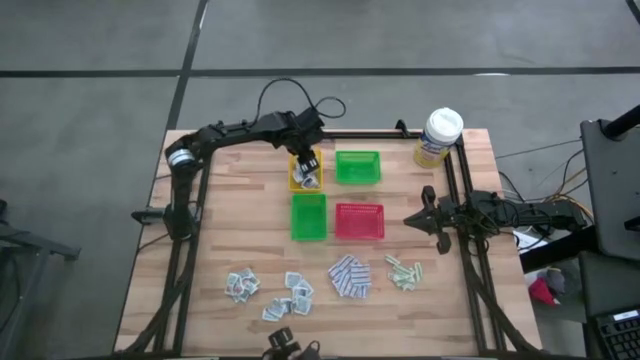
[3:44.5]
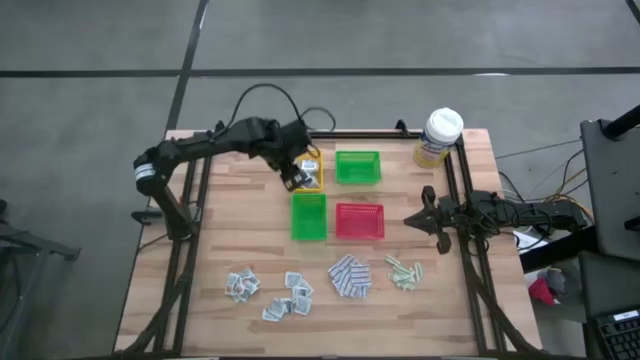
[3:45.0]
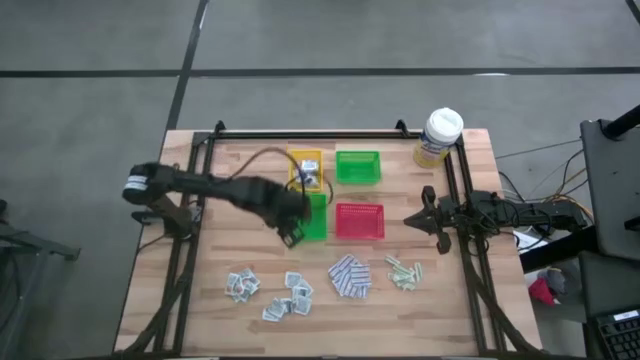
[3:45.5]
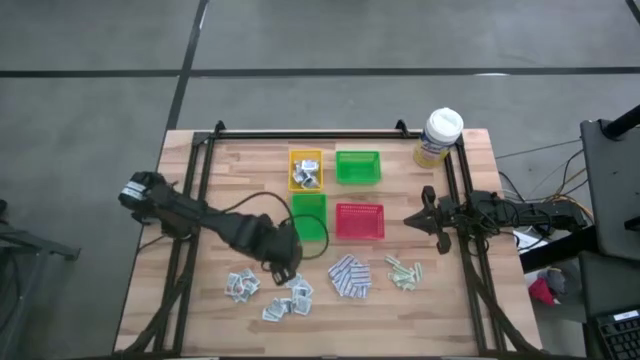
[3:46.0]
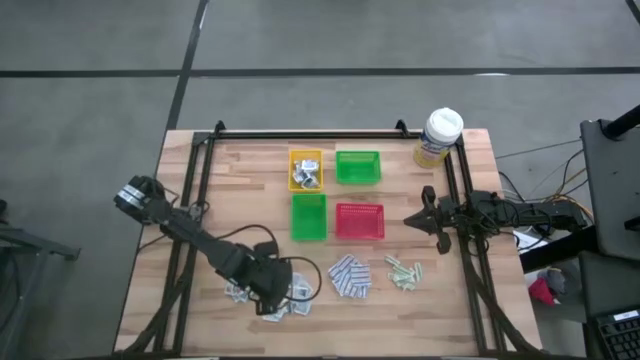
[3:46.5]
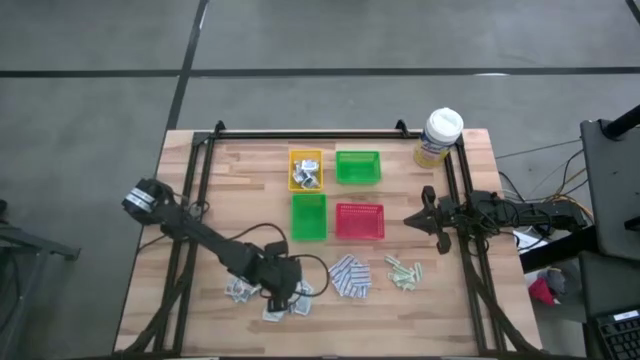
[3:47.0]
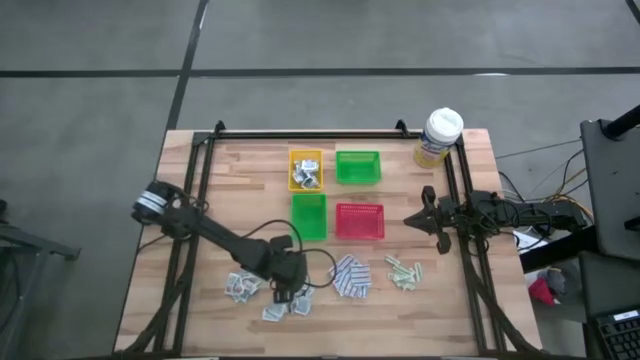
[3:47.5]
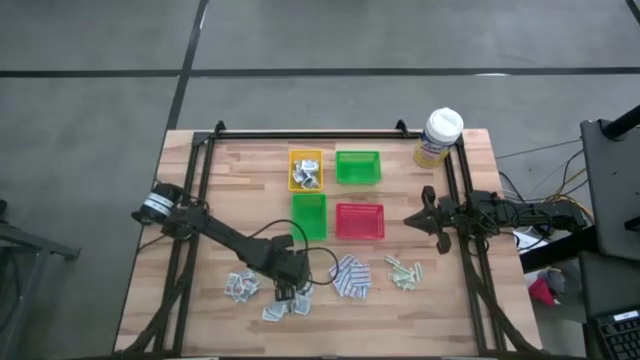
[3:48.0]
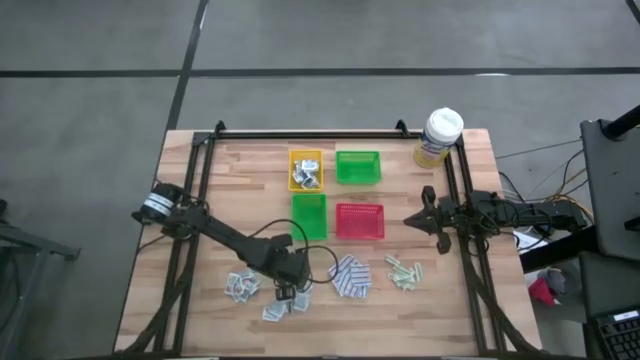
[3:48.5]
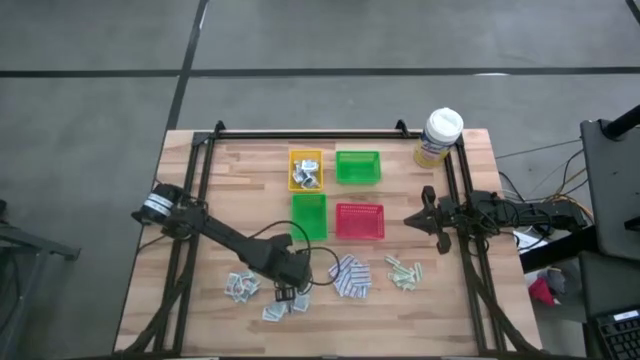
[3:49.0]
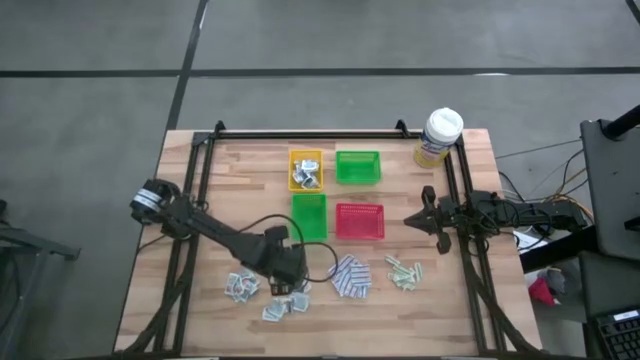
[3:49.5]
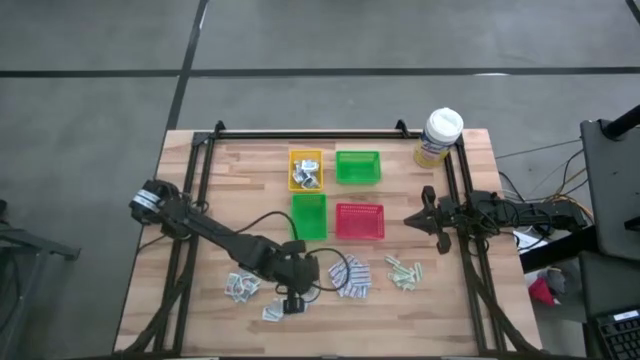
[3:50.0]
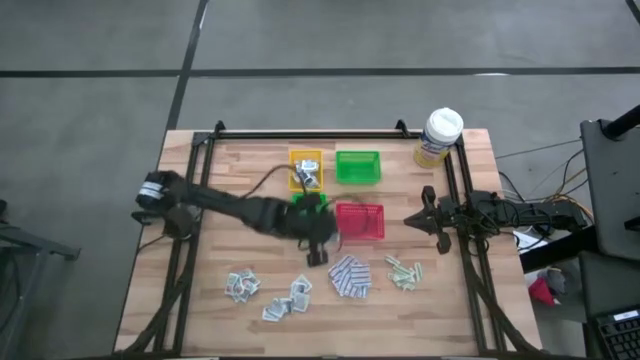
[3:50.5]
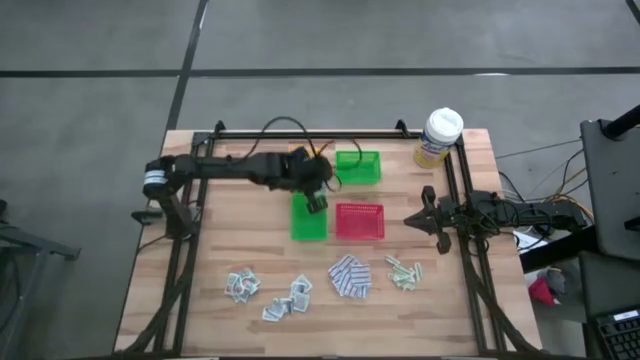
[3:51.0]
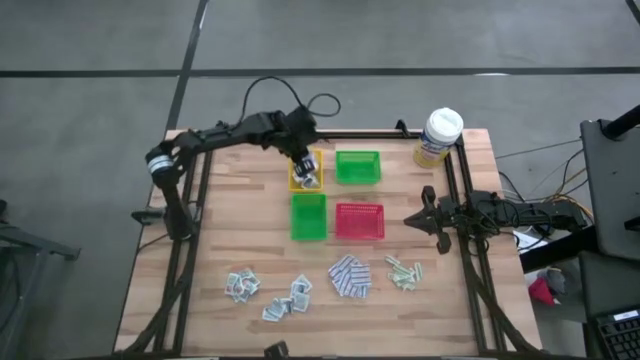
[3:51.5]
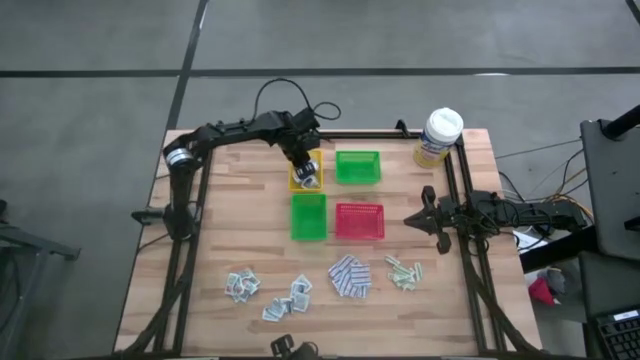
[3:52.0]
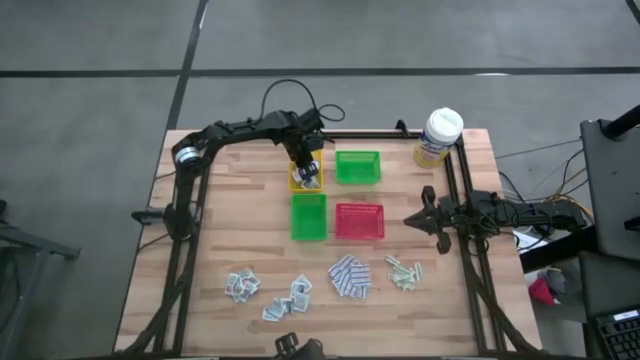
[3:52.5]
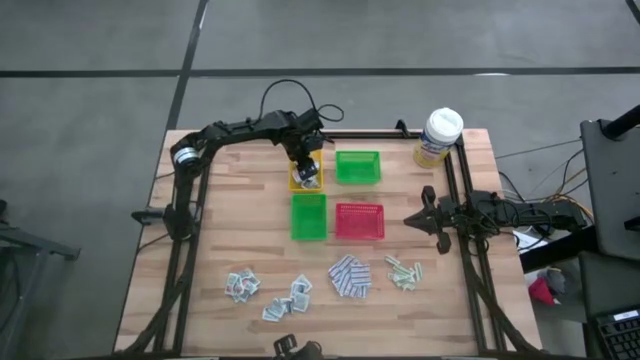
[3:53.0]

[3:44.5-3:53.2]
Task: Pick & Place First Aid Supplies
Put the blue alcohol pad into the yellow bin

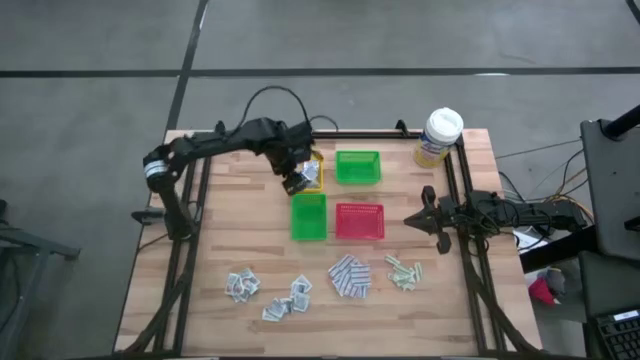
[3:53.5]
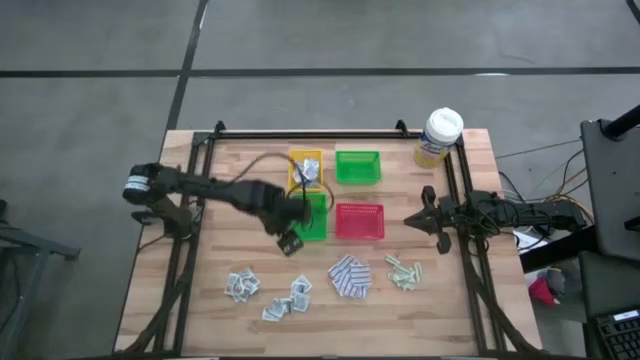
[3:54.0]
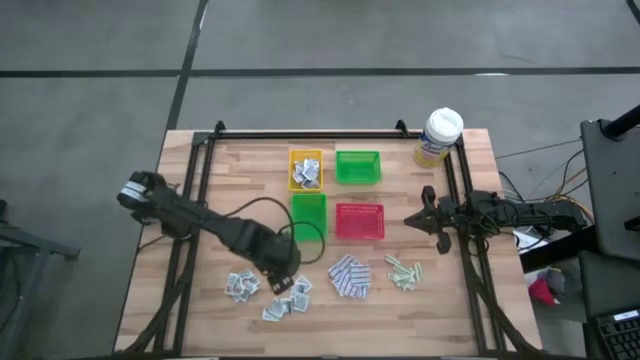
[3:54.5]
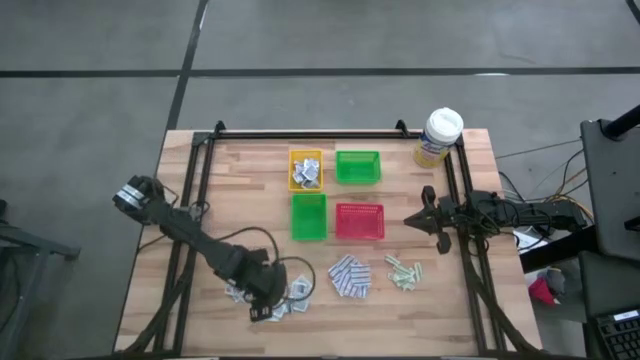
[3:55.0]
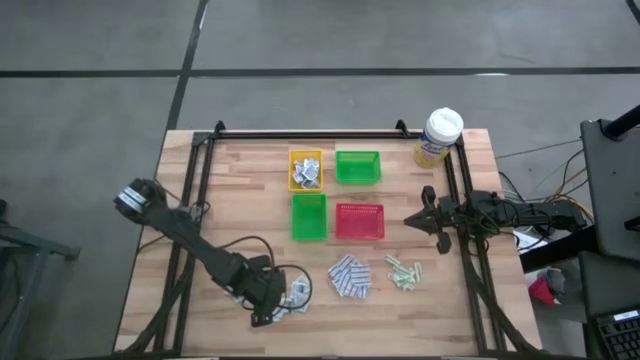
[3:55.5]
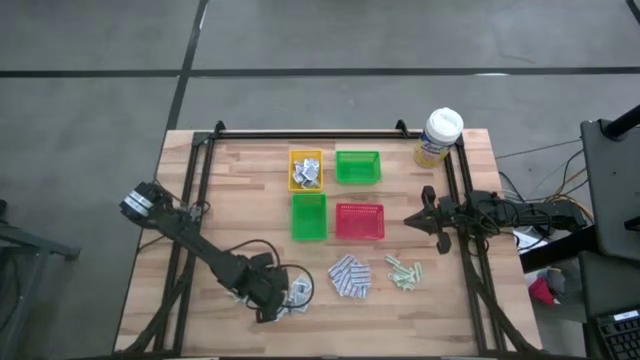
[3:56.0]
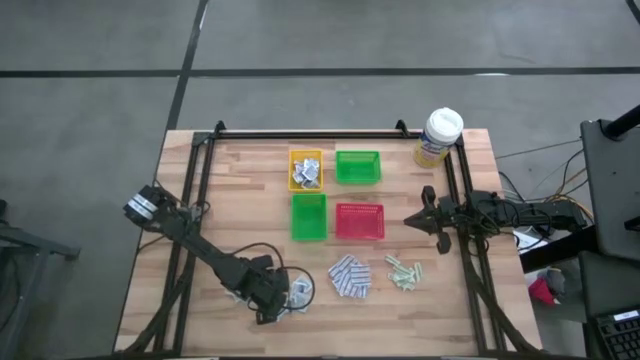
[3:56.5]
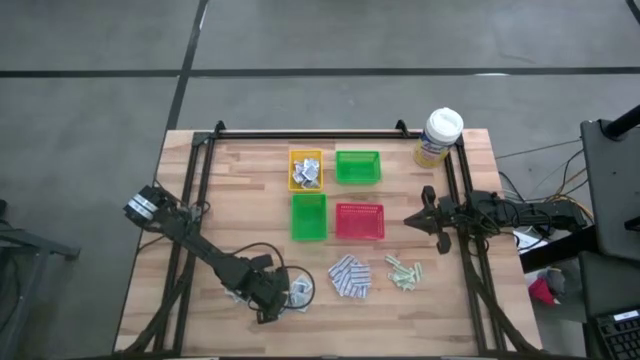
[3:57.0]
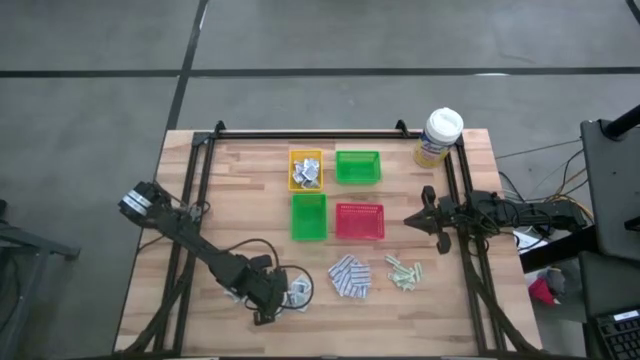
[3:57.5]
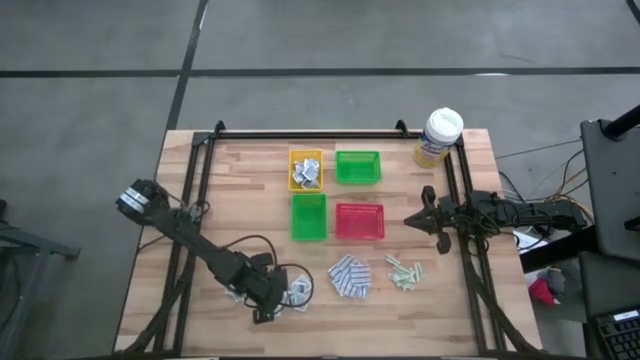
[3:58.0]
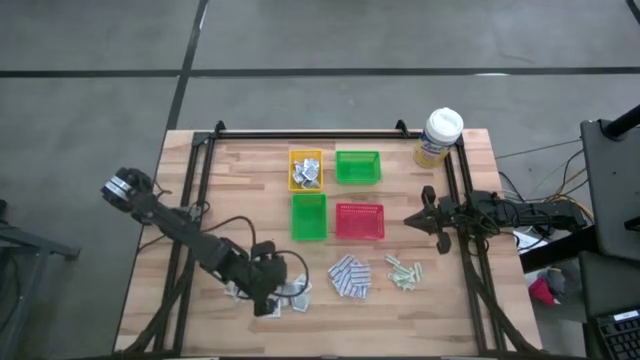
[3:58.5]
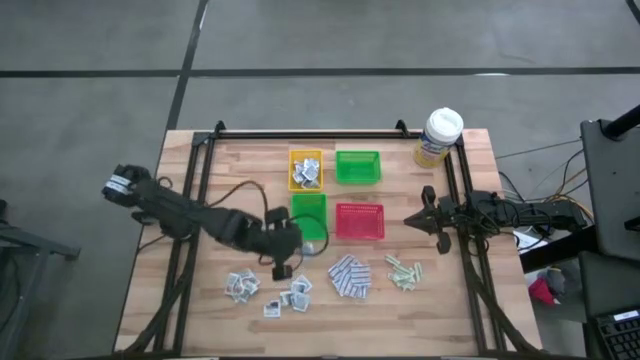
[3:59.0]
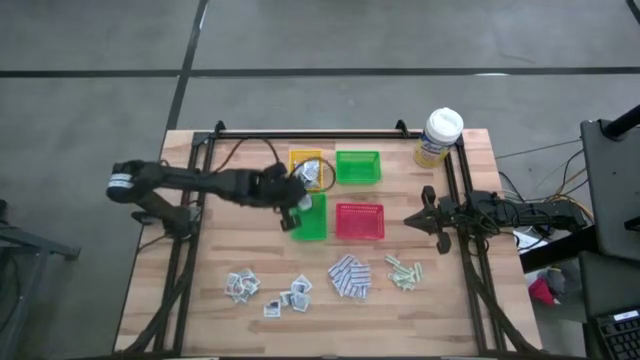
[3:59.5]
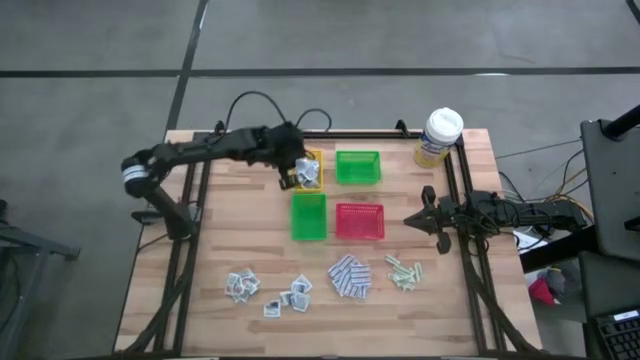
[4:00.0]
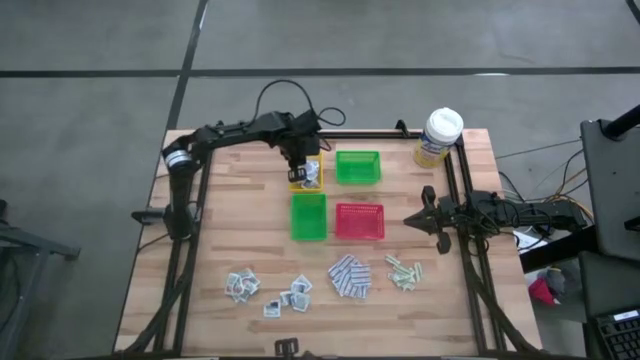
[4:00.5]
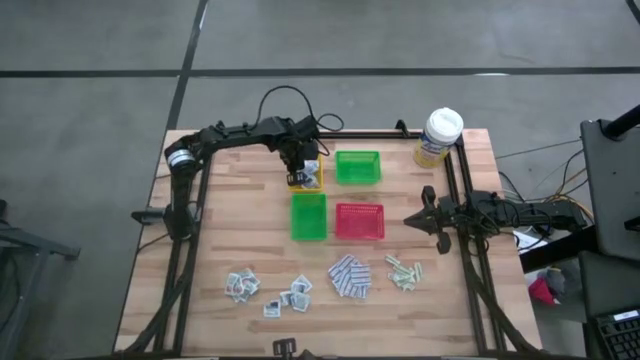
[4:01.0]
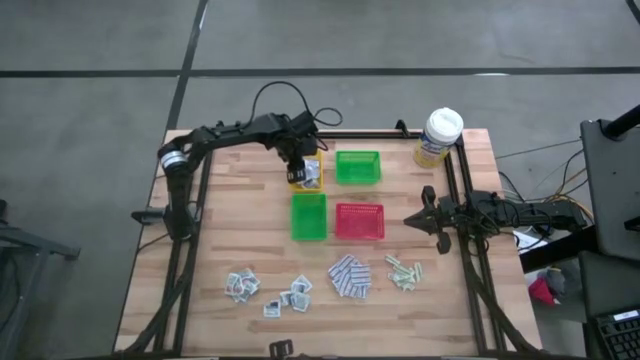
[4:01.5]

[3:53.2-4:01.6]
Put the blue alcohol pad into the yellow bin

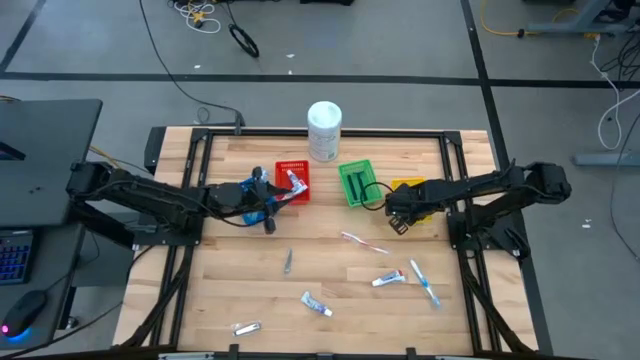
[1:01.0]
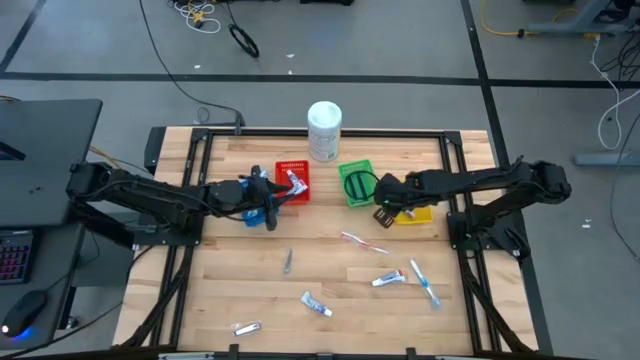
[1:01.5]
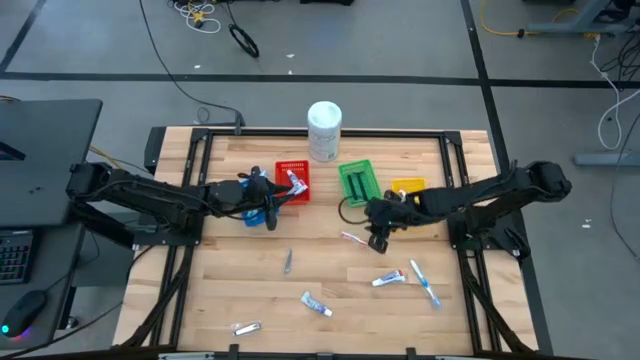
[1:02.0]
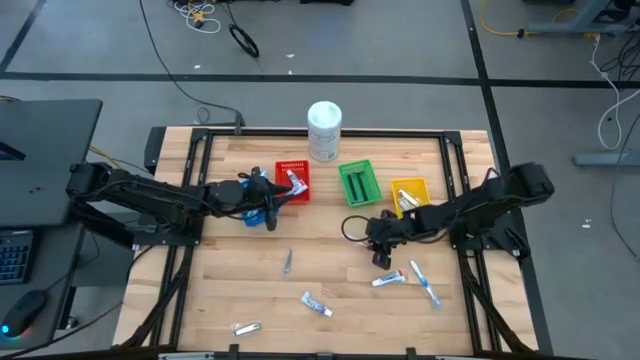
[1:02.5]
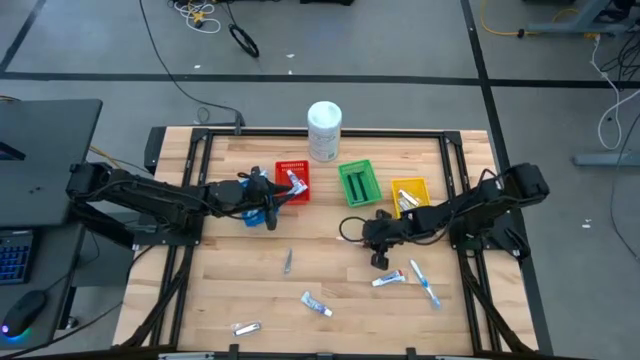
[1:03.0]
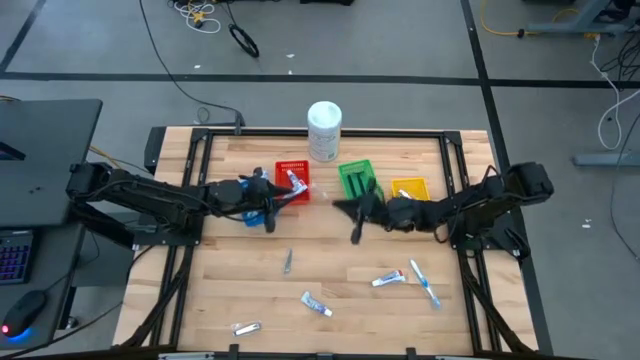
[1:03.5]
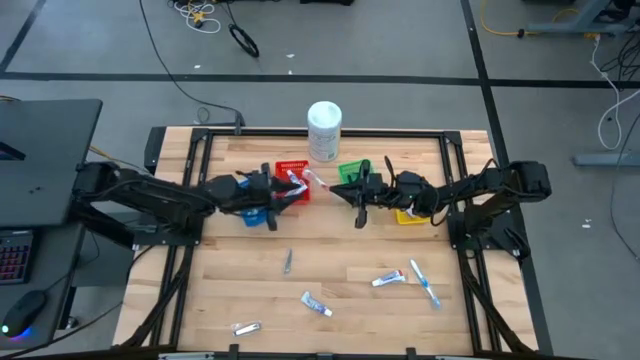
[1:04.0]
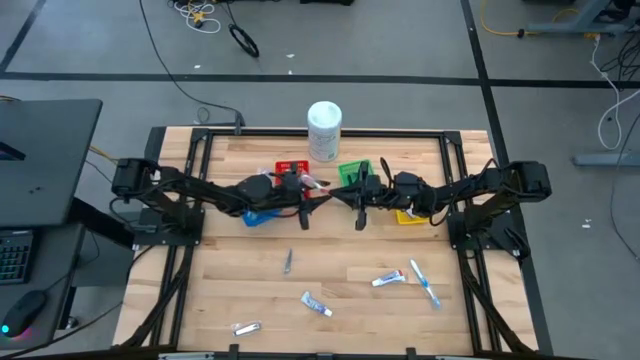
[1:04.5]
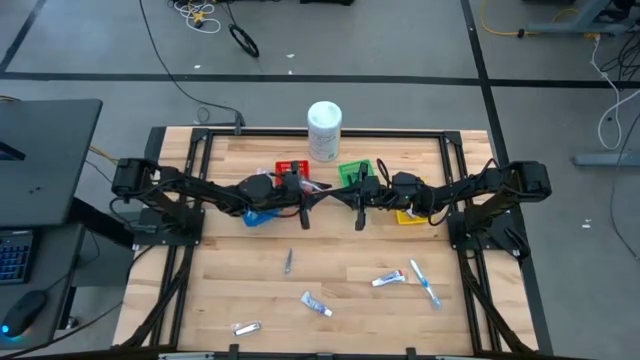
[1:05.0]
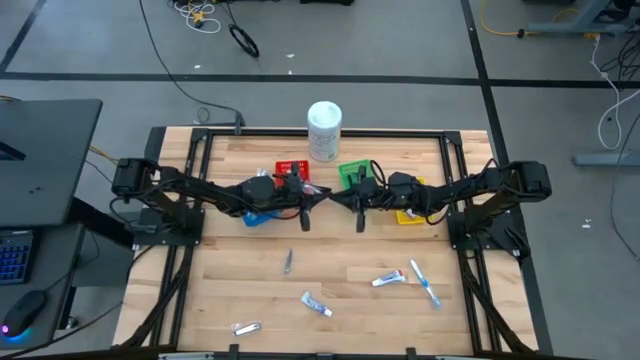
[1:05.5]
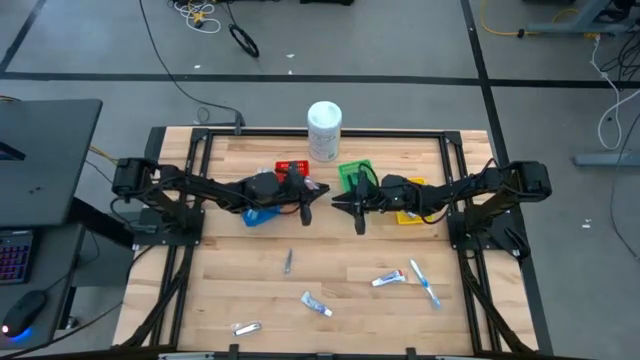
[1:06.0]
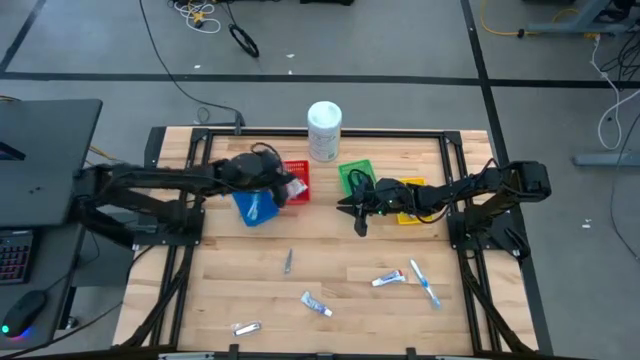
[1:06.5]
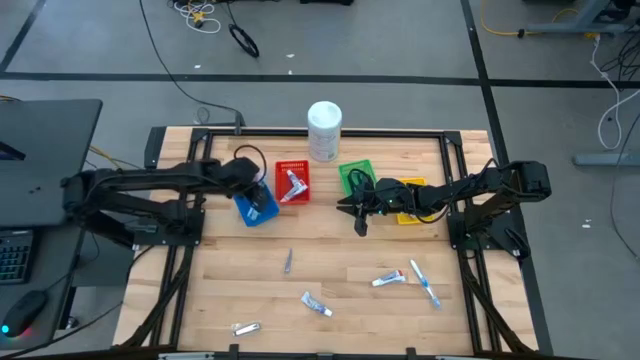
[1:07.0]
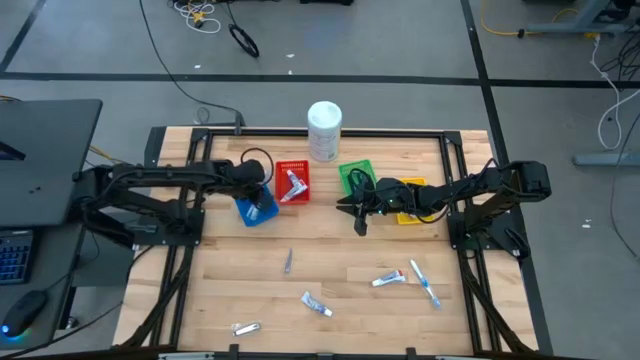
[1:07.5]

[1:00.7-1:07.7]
Task: Pick & Place Travel size toiletries
Put the orange toothbrush into the blue bin
